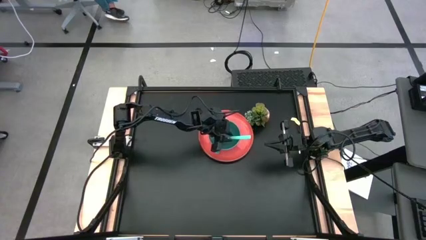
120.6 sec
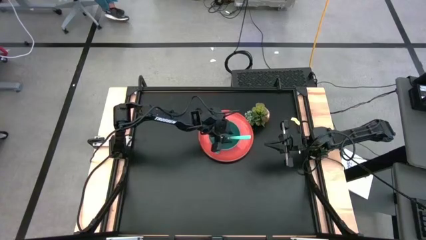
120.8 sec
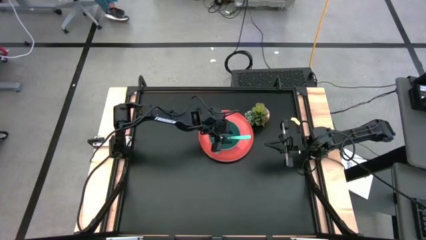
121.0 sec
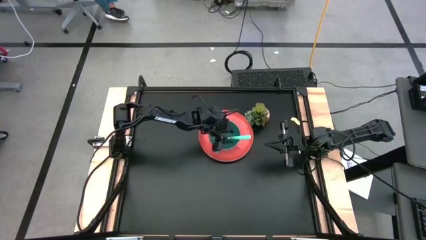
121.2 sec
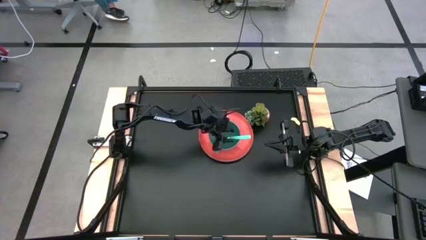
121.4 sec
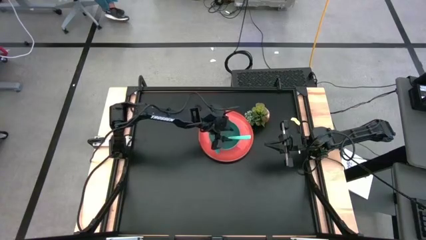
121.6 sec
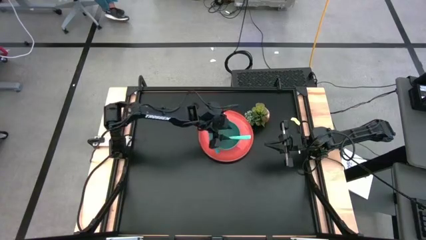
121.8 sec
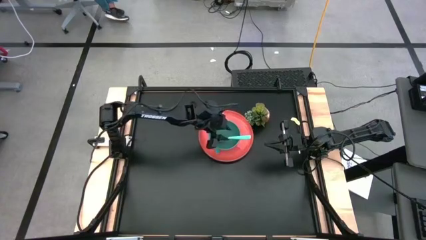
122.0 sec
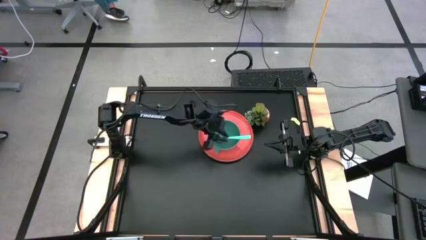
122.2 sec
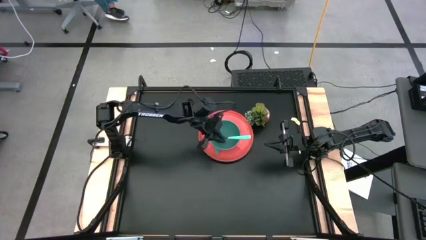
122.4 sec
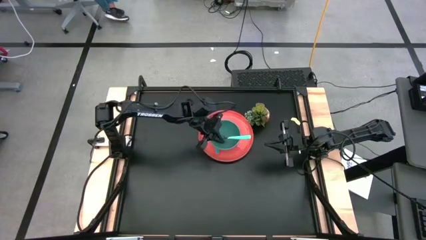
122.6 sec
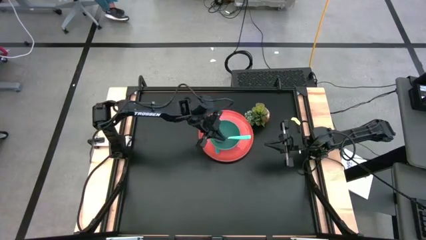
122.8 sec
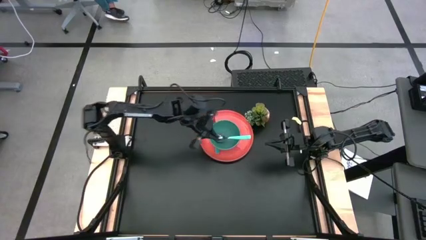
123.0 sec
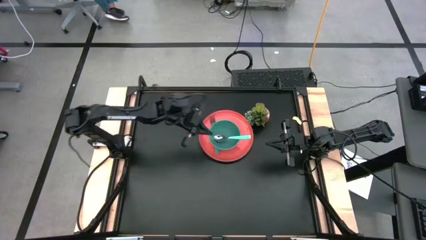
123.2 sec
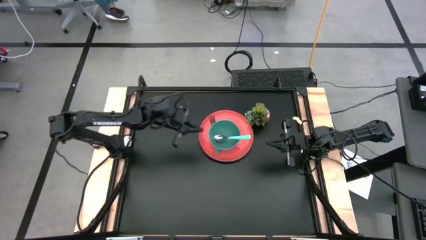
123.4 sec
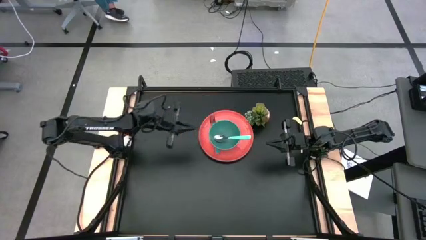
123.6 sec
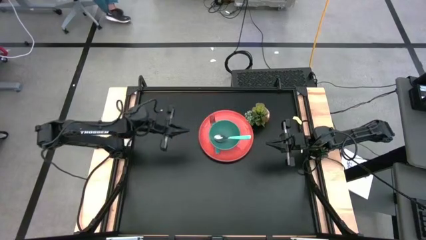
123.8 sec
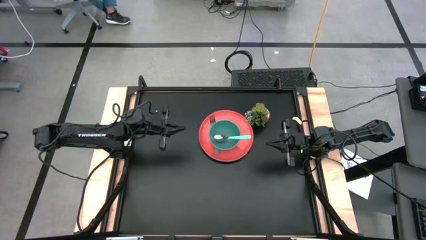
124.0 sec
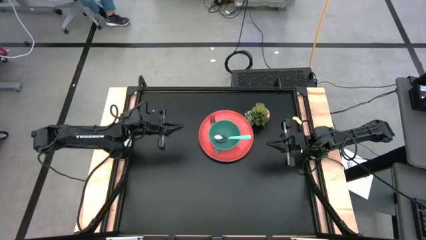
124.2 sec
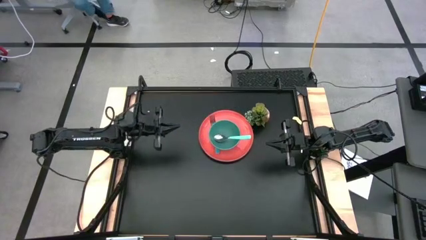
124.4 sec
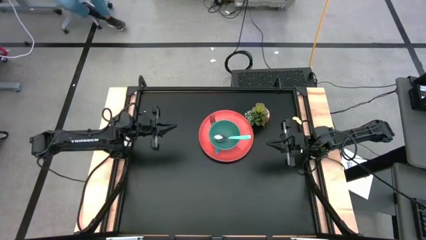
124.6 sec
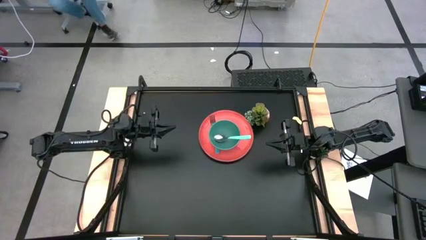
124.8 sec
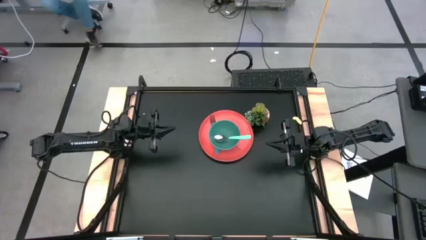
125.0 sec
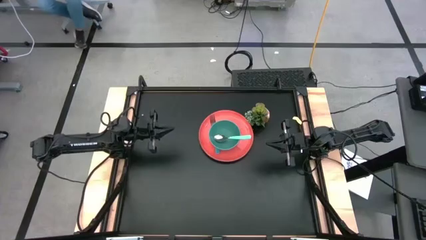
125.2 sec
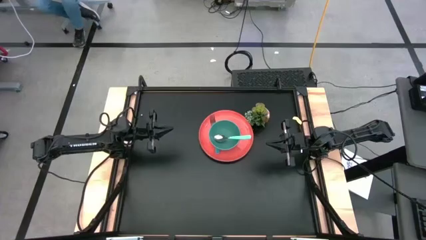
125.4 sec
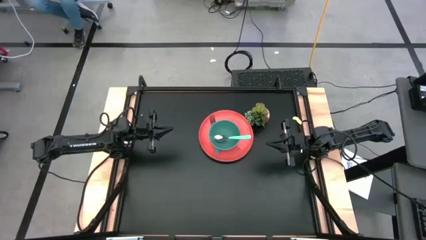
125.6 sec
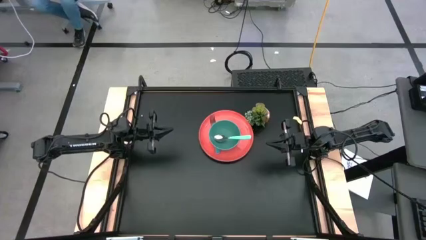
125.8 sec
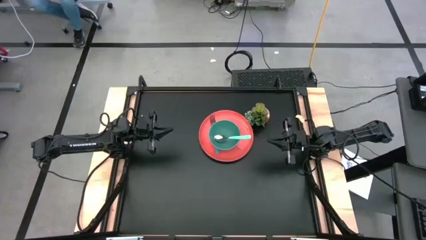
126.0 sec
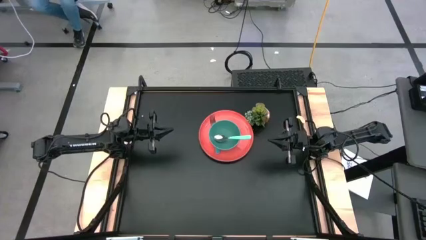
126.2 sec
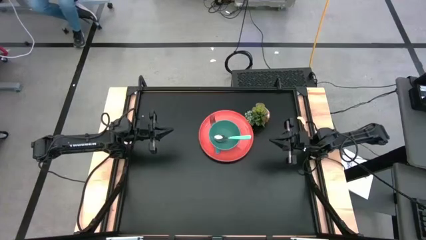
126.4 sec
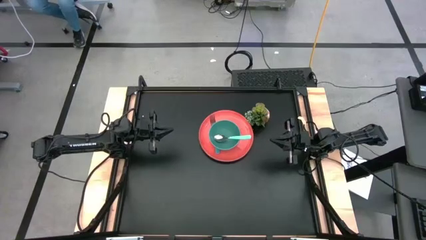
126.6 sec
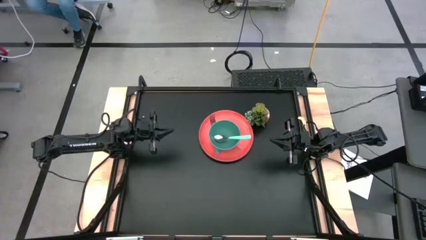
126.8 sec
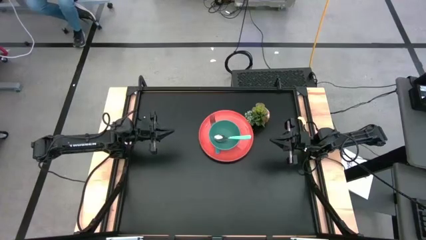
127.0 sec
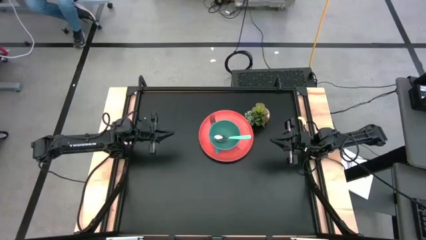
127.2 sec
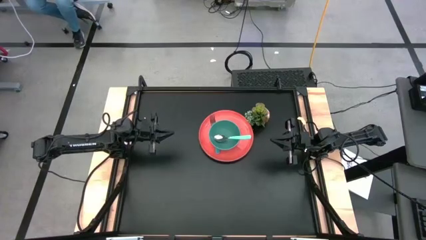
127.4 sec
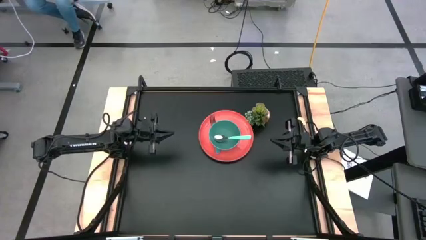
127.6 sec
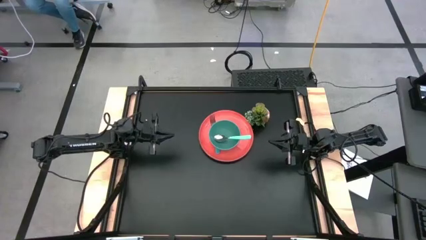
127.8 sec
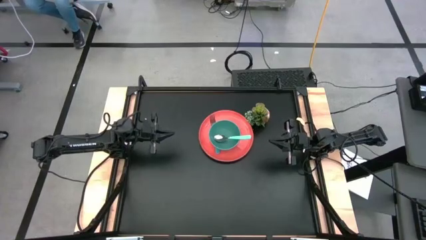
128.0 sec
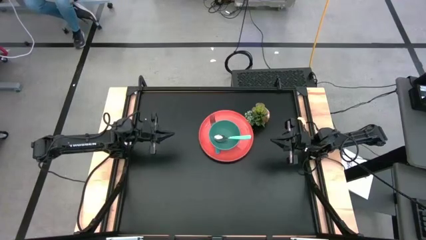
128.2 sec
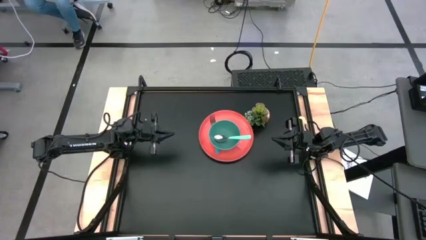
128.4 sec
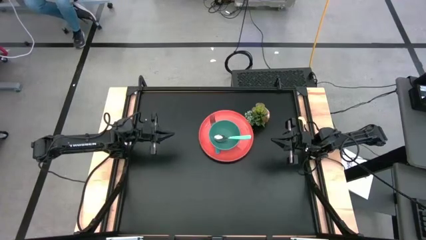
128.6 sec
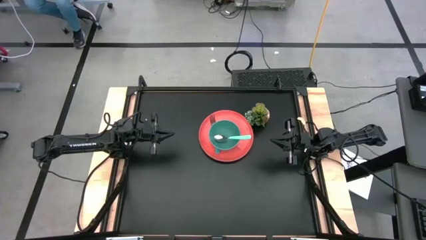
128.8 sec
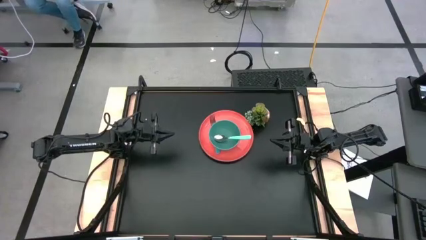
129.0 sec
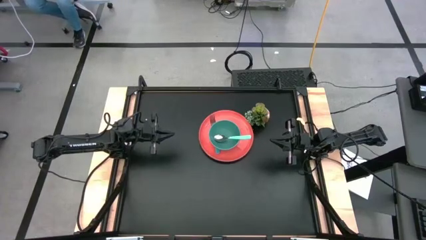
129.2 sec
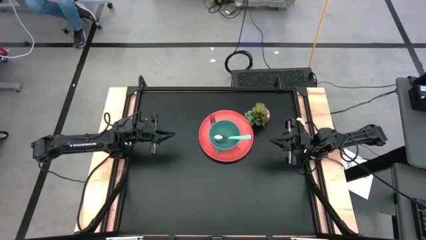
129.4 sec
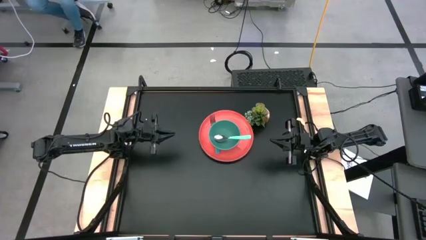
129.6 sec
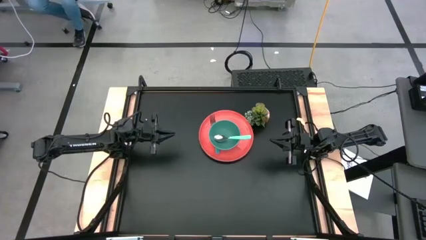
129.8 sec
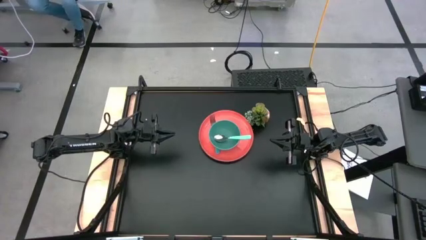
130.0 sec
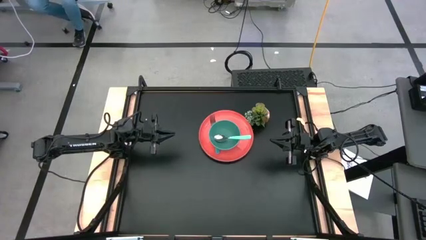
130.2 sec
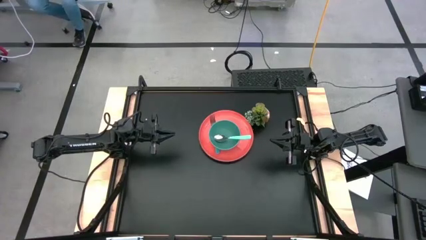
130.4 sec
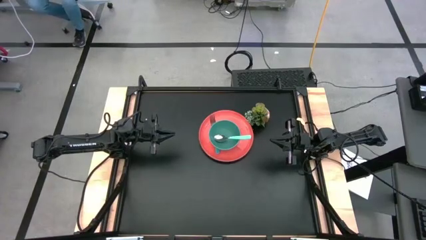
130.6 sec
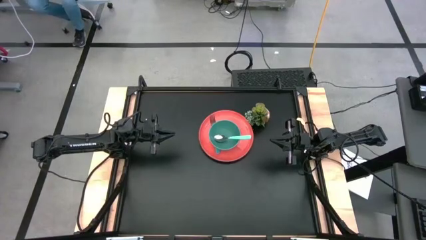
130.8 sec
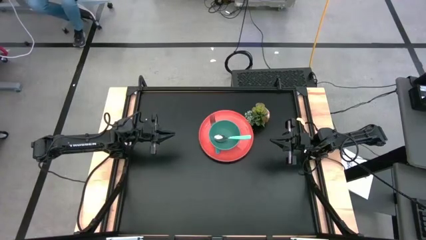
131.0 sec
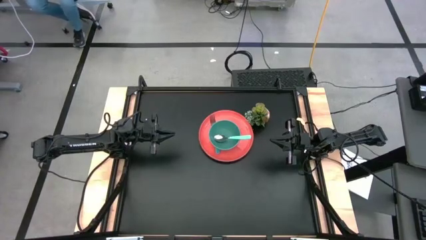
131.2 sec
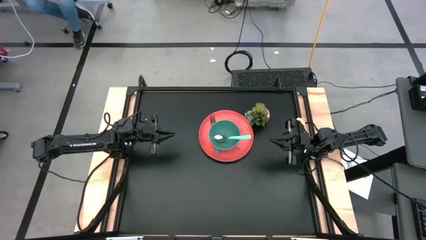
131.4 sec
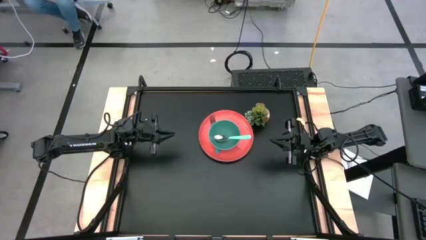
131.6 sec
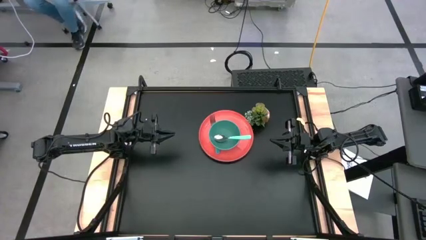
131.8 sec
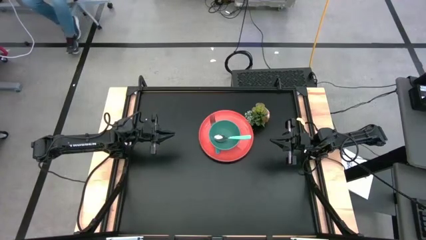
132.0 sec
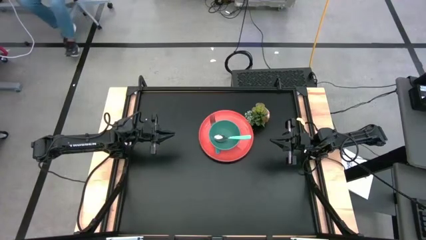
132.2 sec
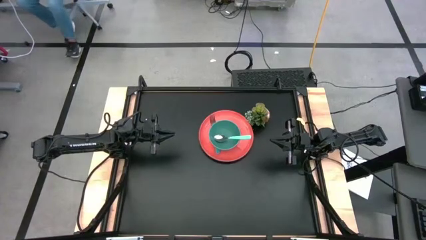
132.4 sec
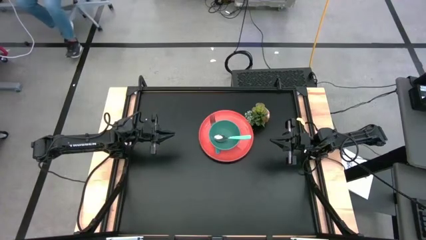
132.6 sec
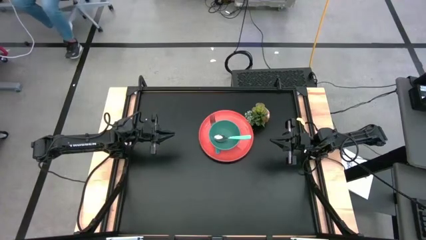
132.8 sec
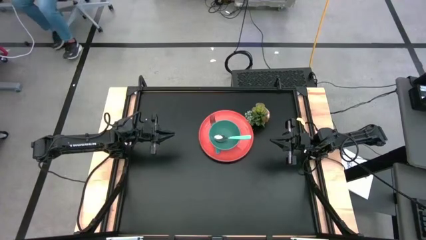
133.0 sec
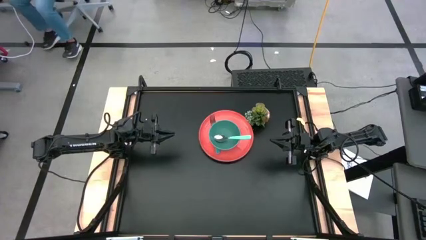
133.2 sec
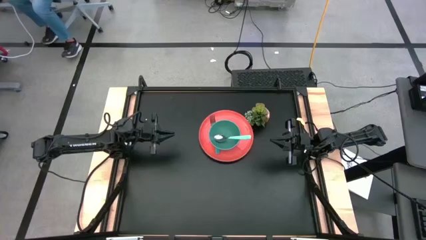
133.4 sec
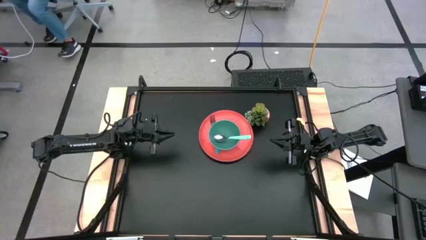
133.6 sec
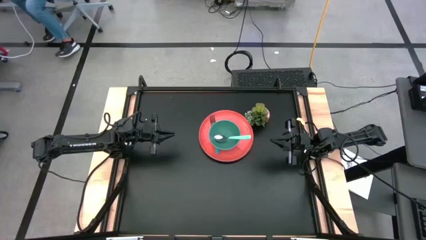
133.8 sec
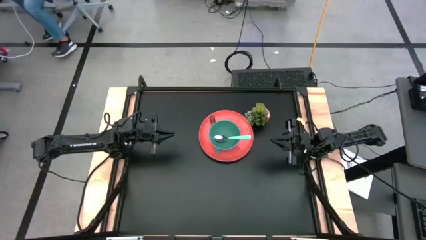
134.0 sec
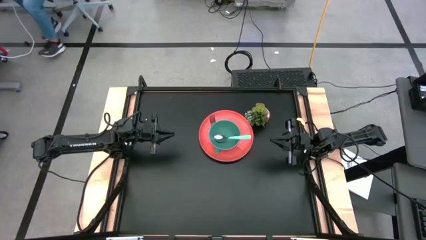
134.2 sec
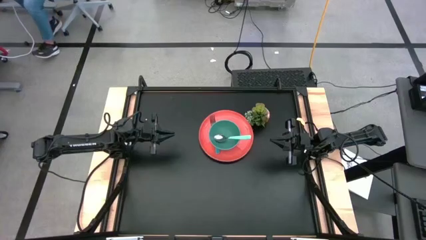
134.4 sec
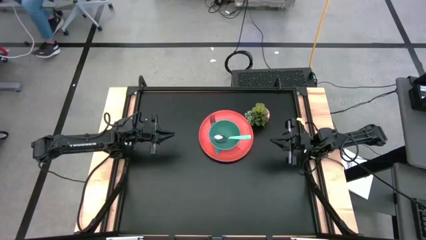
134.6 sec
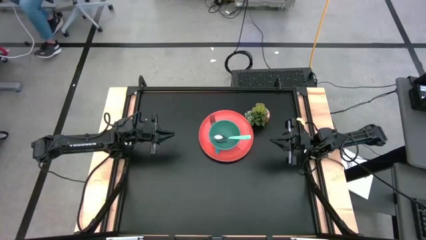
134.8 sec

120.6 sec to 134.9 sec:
Task: Set table place
Return to Home Position

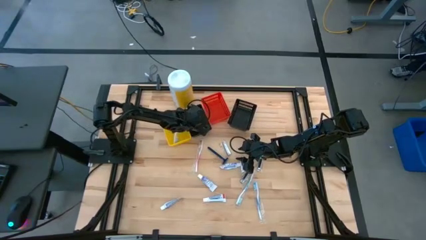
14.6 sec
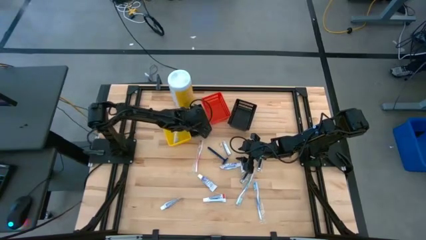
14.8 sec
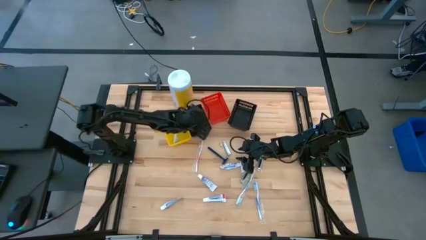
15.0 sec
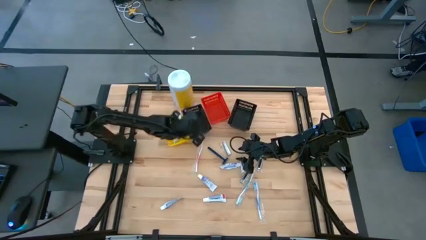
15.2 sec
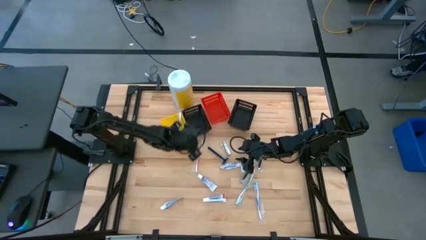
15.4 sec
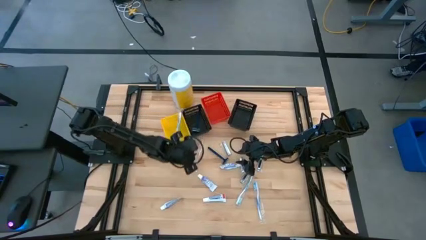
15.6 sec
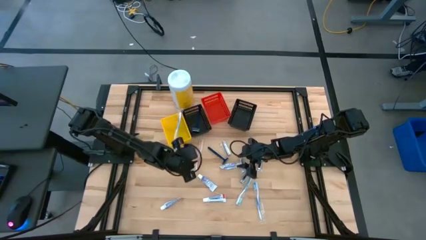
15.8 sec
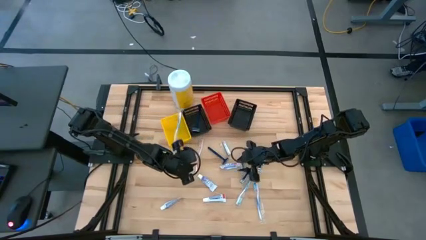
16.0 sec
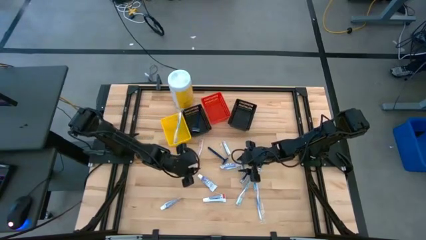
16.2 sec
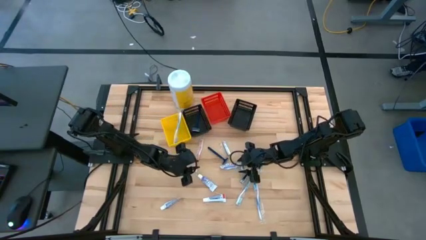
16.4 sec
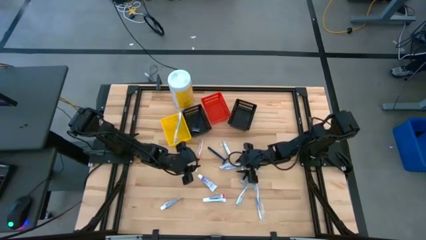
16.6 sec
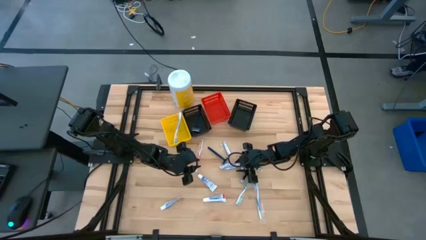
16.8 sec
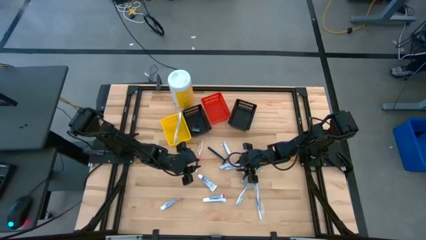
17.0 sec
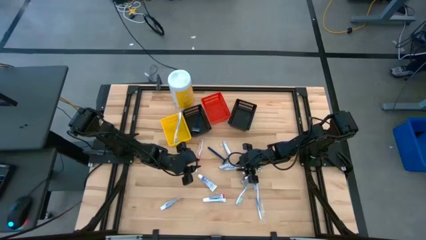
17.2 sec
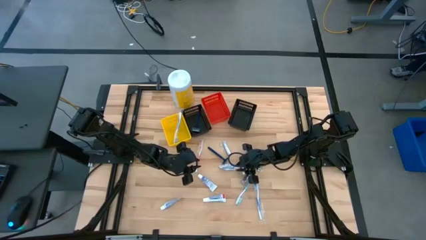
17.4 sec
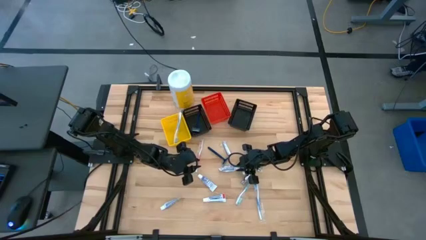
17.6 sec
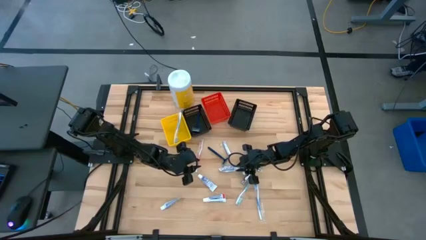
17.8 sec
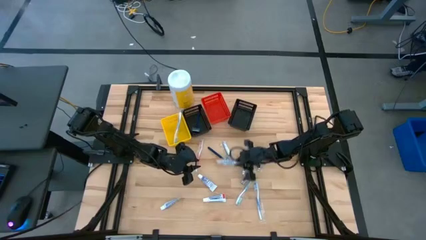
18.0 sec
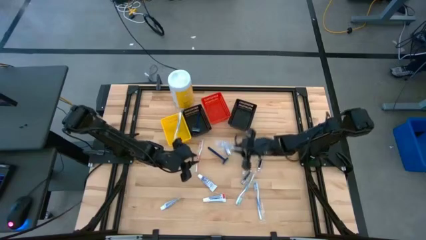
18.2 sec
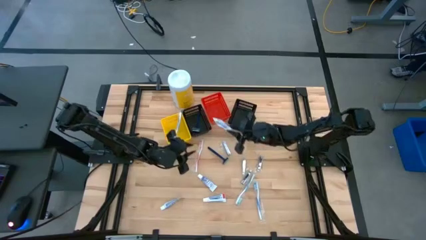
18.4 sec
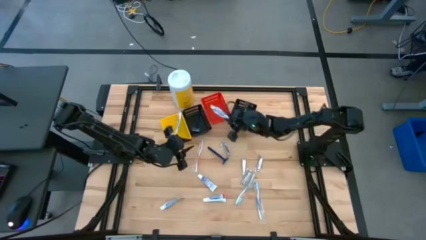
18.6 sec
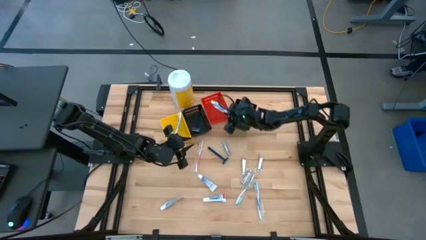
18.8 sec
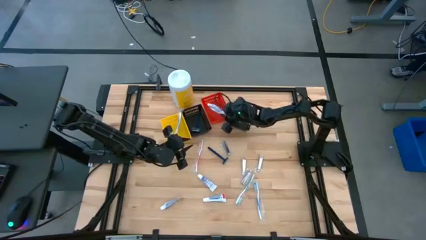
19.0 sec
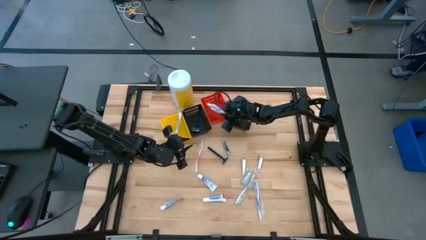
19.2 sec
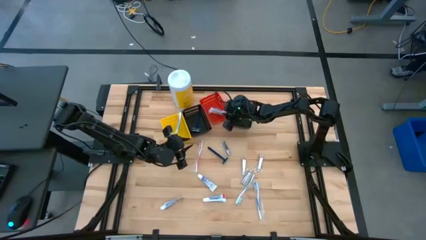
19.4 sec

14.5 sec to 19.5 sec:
Task: Pick & Place Travel size toiletries
Put the white toothpaste into the red bin
